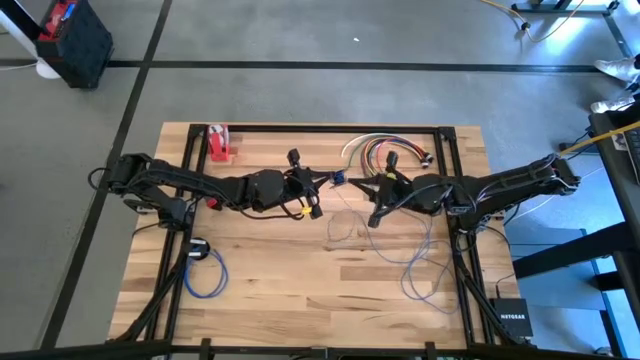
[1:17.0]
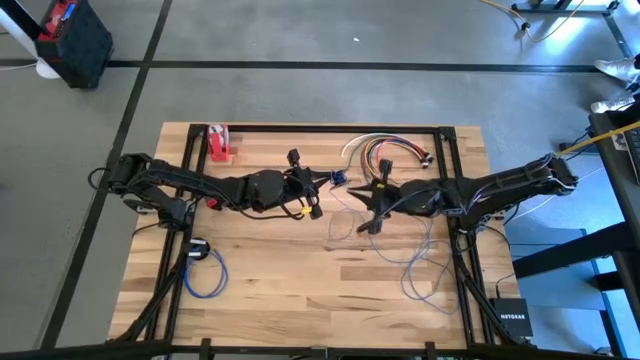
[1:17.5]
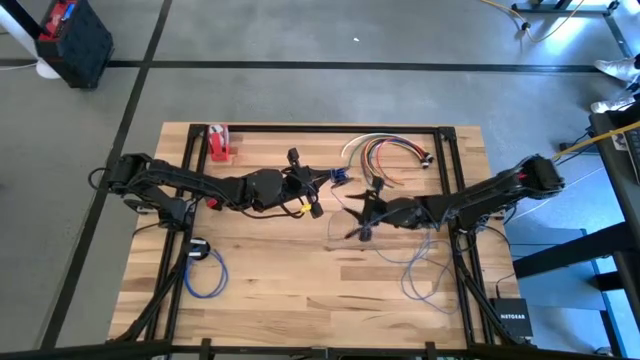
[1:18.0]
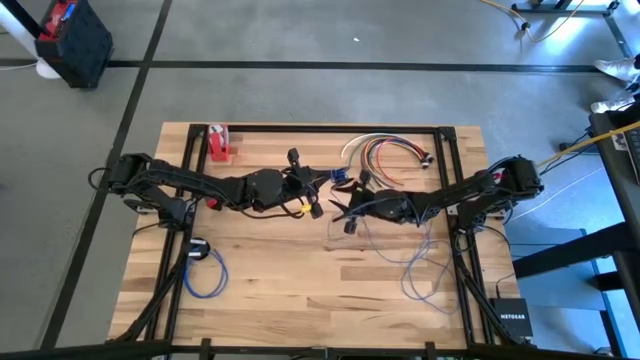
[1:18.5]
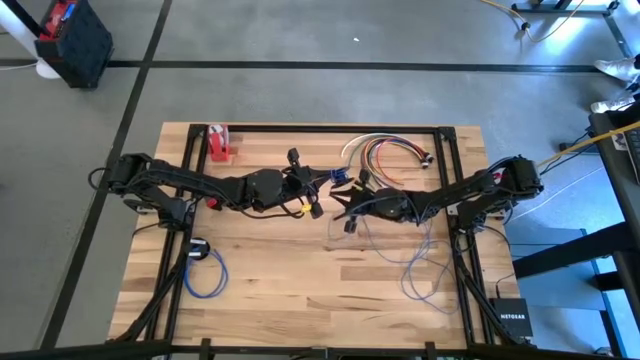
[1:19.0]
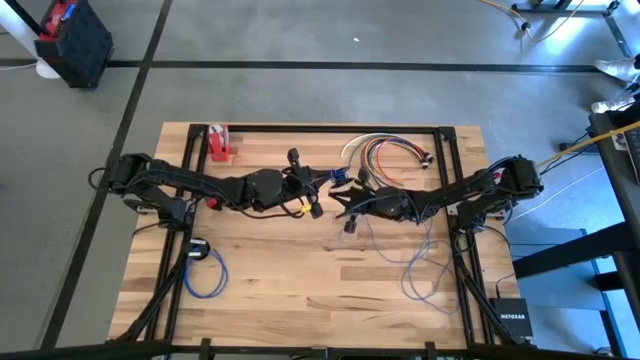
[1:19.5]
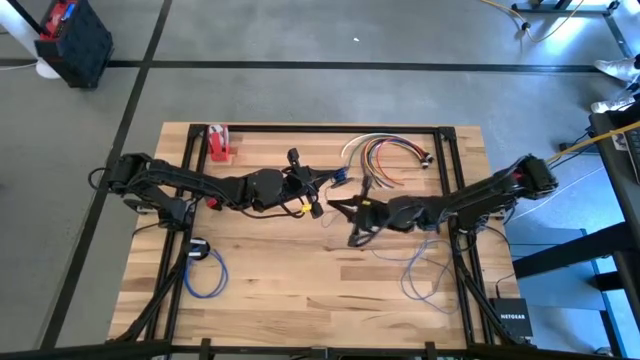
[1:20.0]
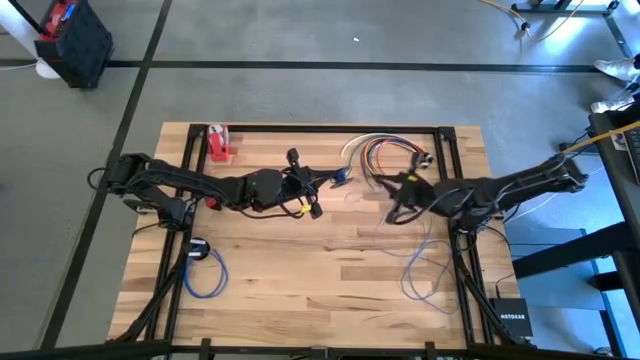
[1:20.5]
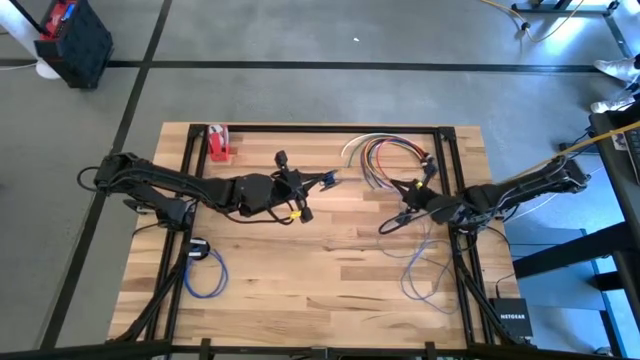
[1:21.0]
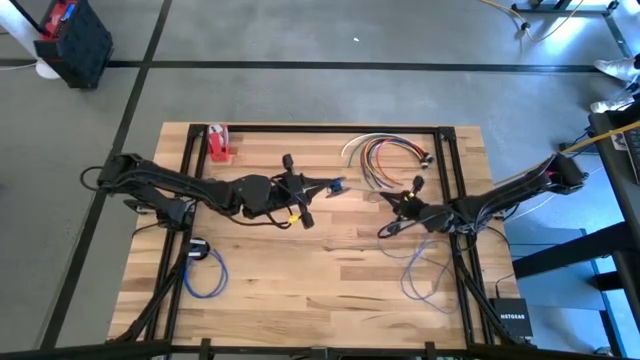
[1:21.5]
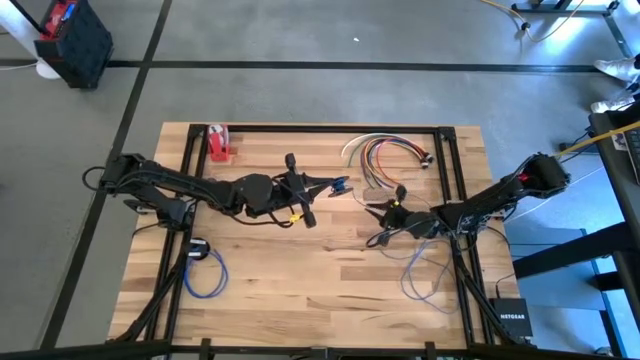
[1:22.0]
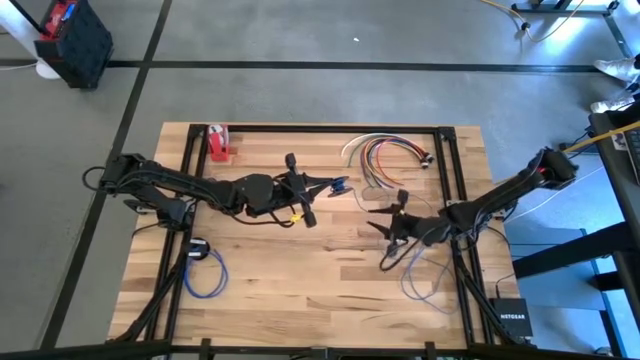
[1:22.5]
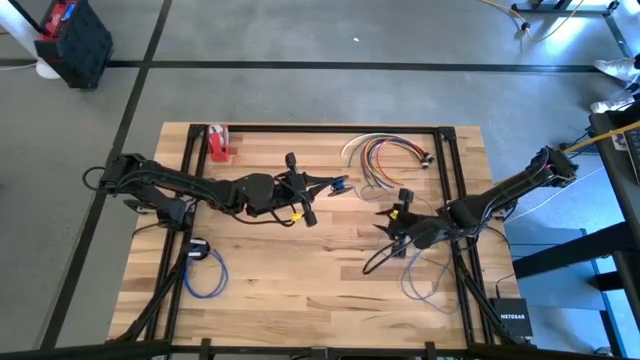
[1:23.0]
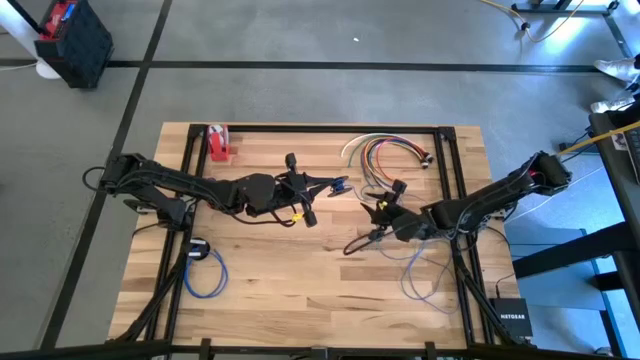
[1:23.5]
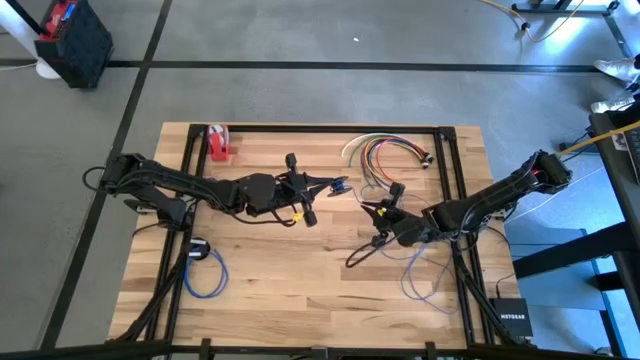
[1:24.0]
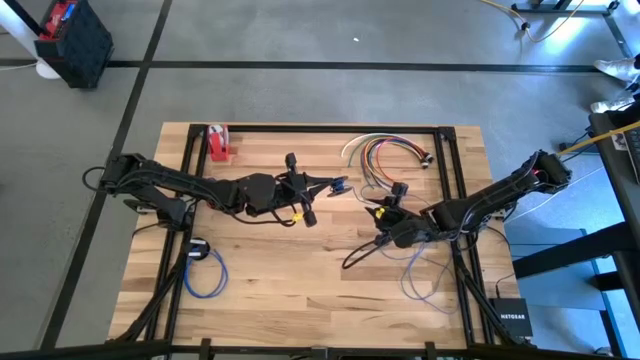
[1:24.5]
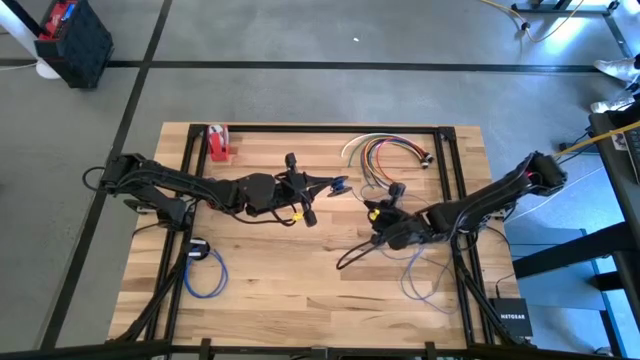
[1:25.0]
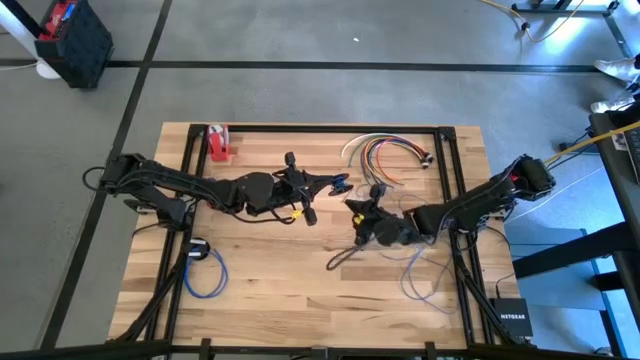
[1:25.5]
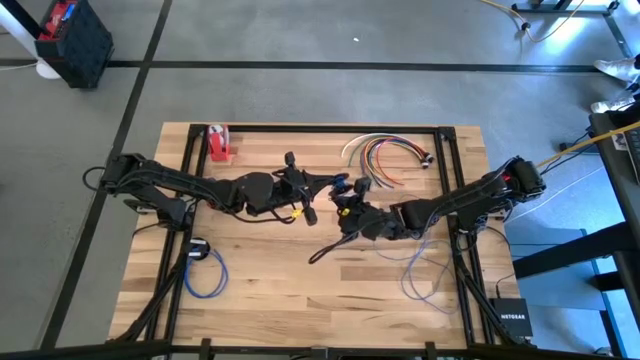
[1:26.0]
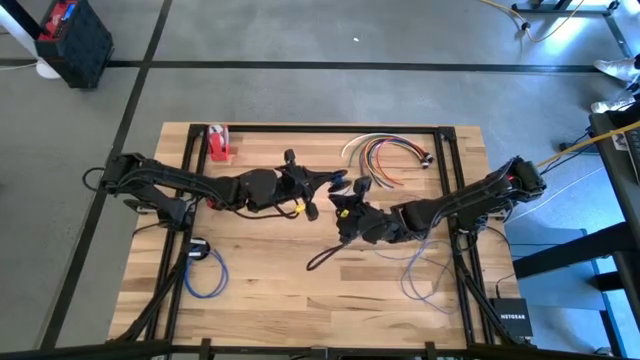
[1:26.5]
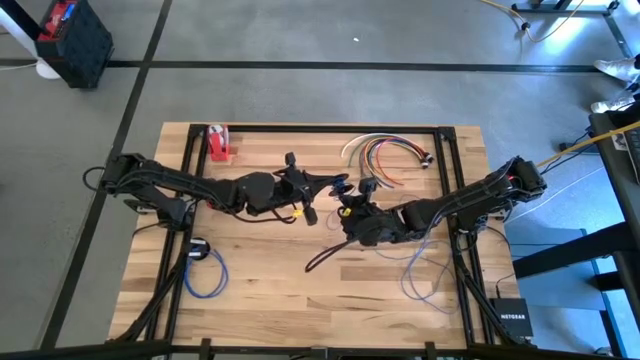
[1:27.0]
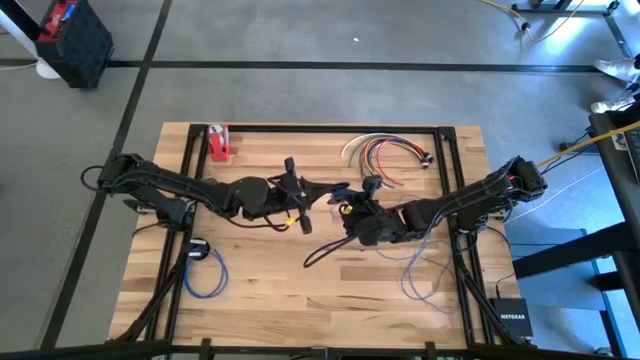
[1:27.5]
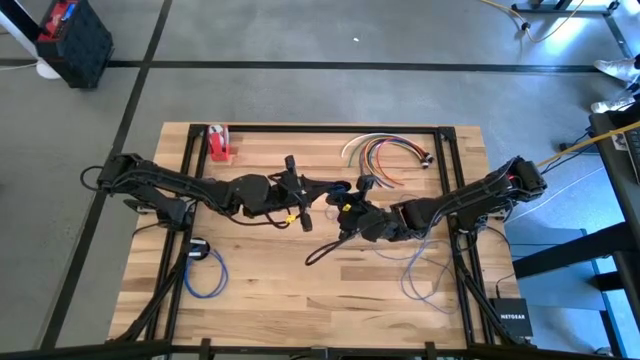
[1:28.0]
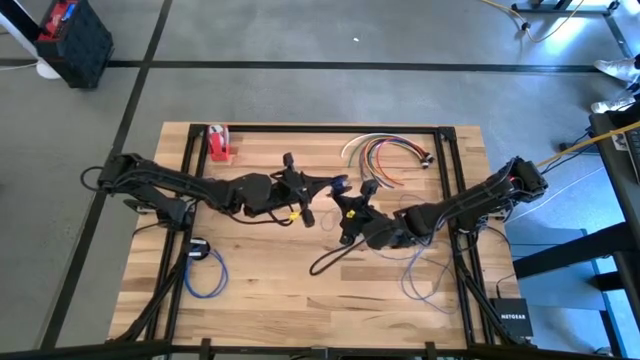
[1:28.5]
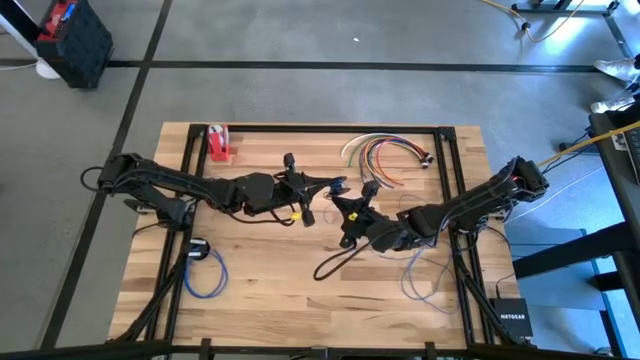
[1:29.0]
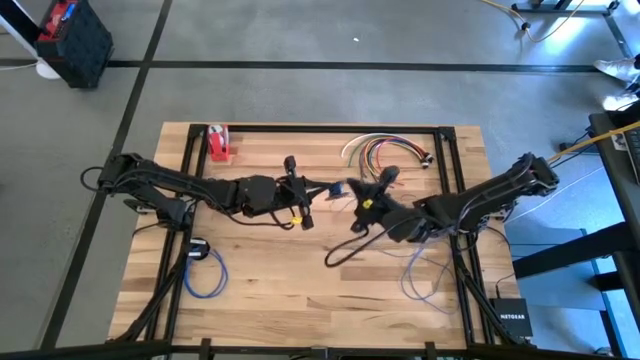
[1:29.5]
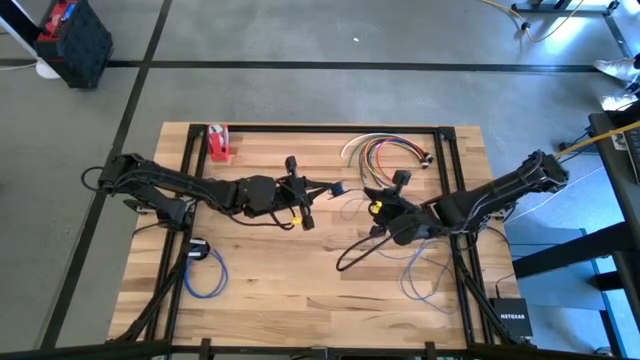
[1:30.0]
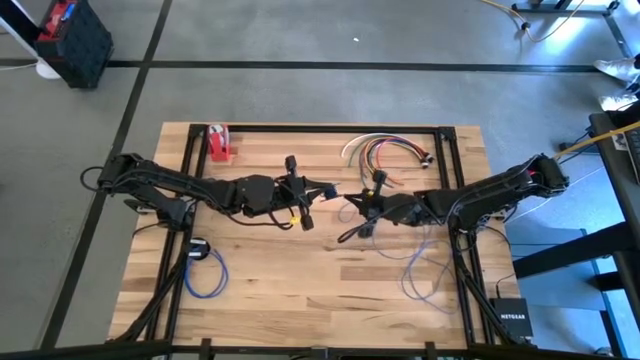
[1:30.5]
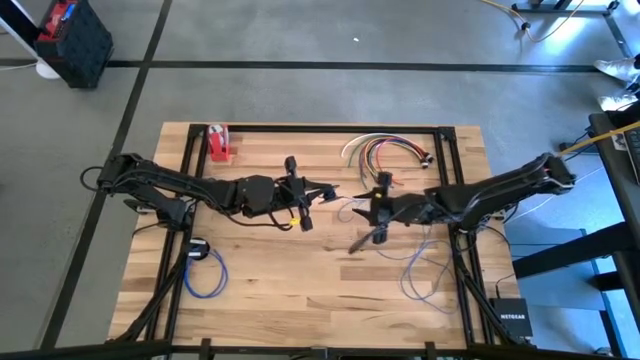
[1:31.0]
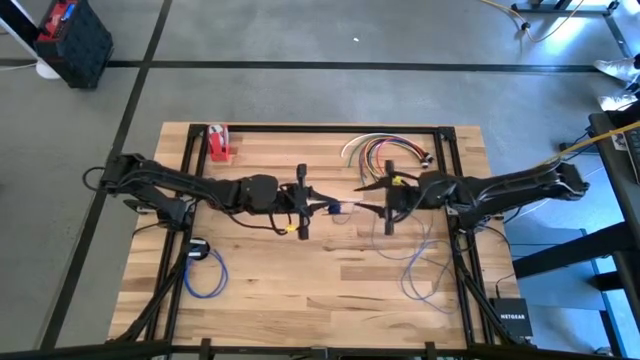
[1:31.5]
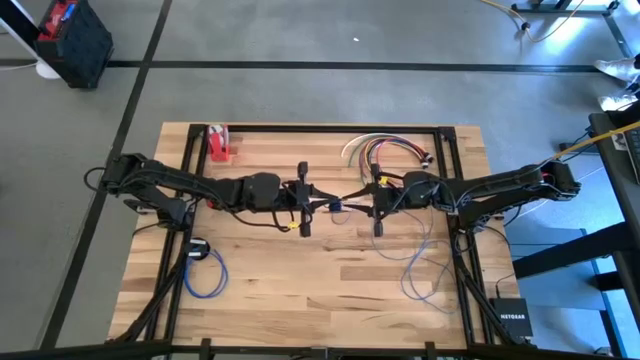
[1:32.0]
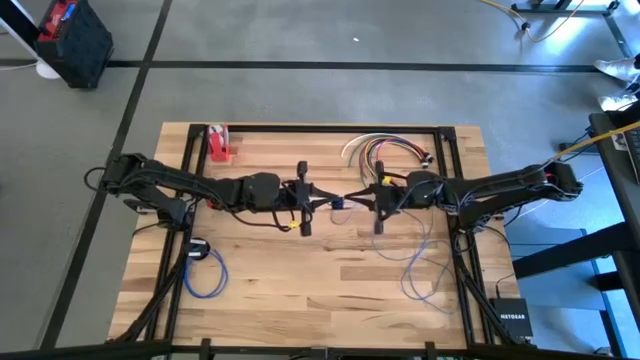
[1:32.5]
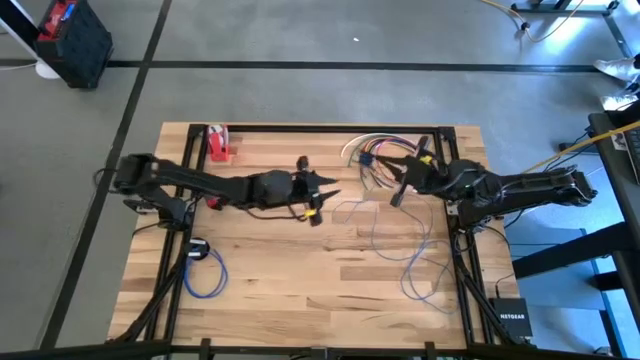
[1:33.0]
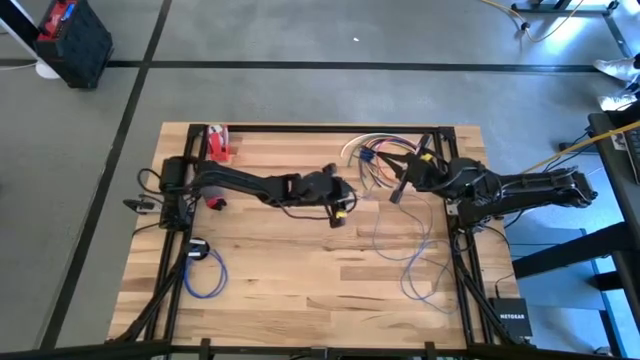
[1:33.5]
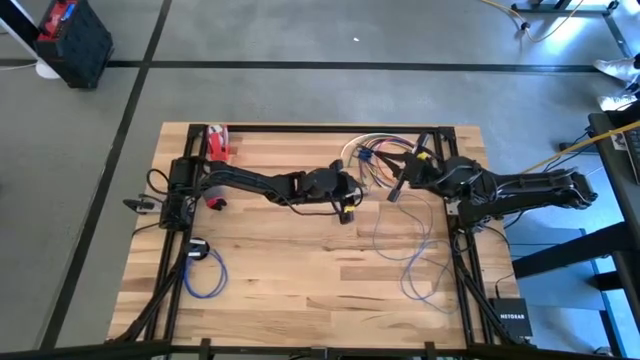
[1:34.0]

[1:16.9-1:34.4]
Task: Coil cords
Coil the blue cable wire on the black spool

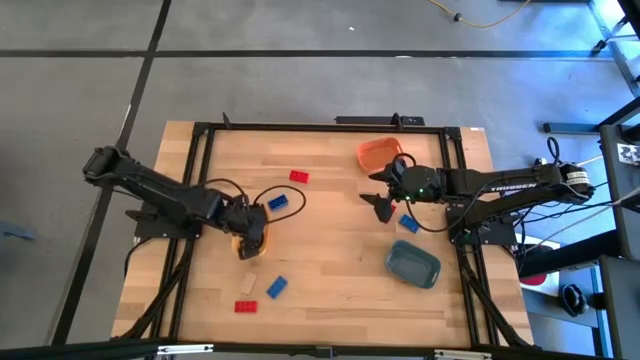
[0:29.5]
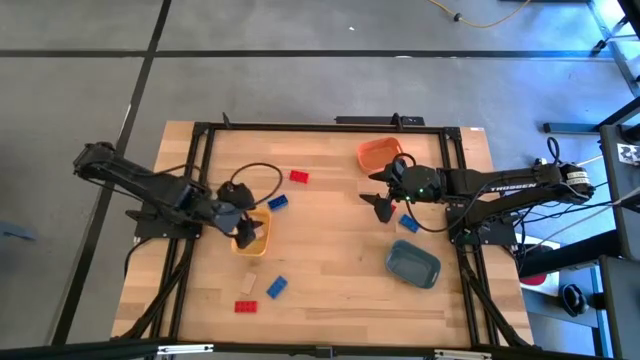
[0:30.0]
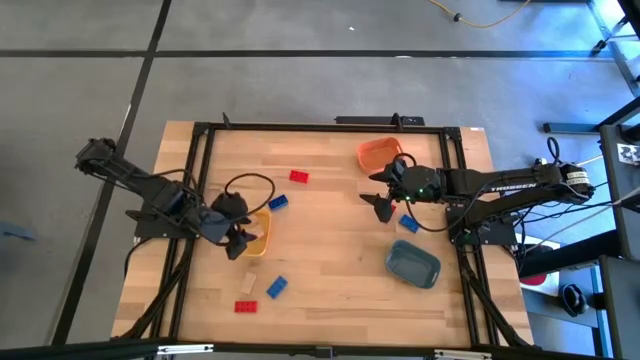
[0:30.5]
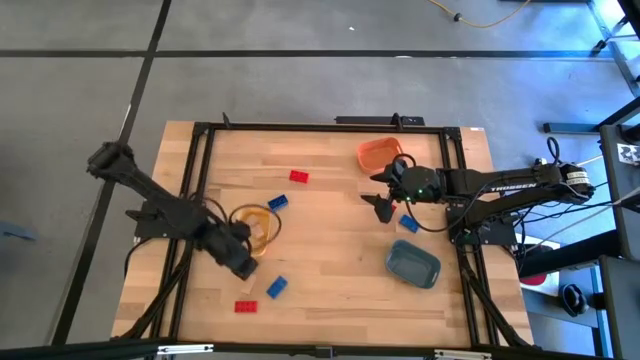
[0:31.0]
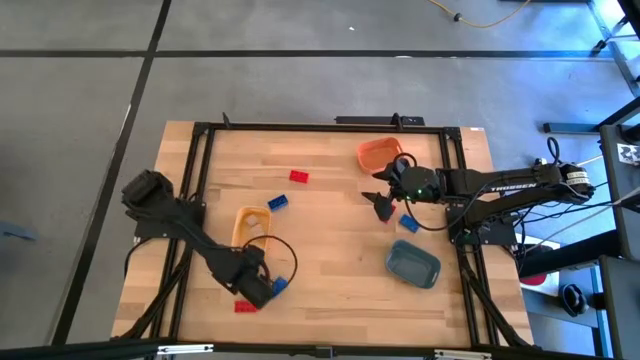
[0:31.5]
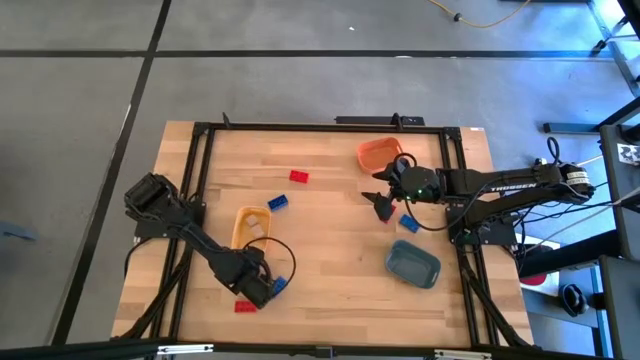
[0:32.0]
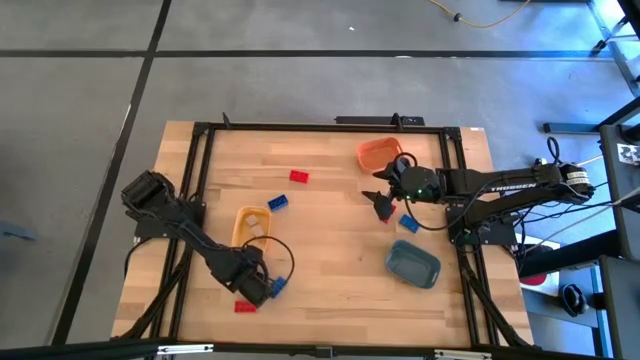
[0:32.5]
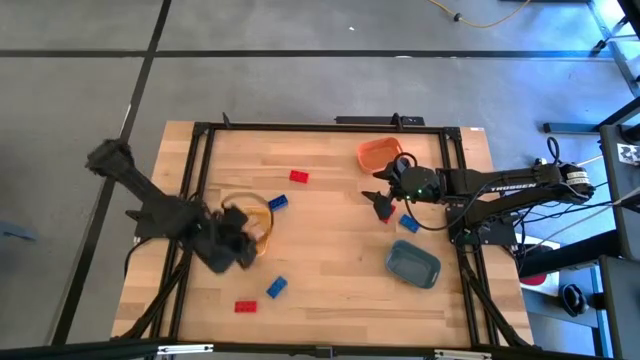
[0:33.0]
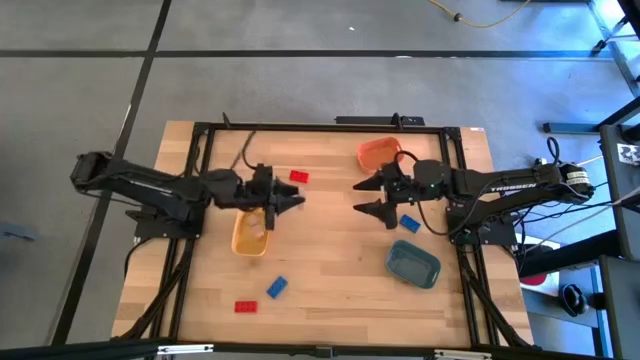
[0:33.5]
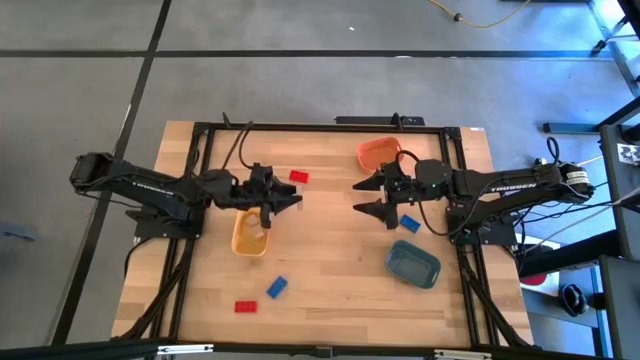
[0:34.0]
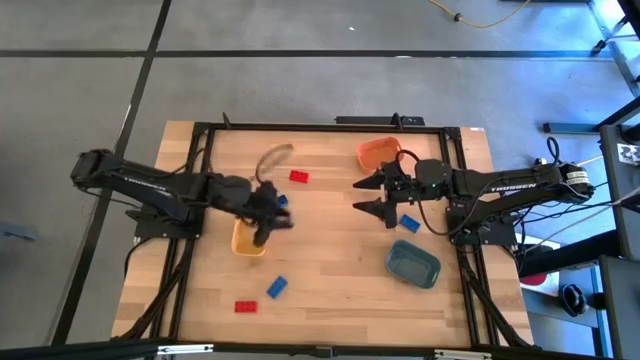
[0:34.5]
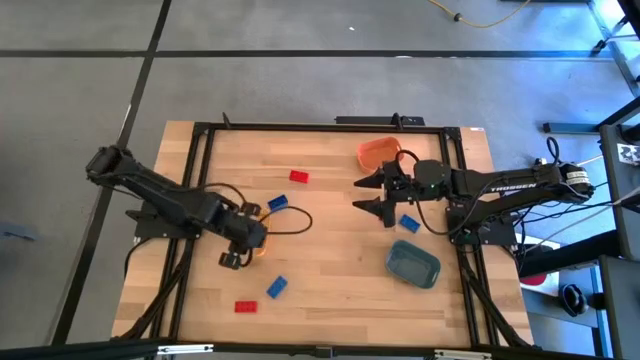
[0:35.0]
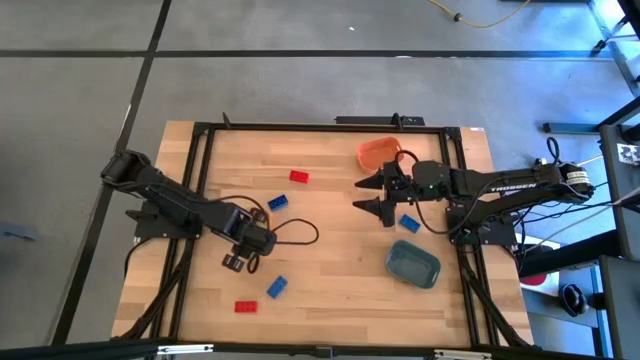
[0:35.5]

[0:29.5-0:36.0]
Task: Sort & place blocks by color
Put the brown block into the yellow bin
